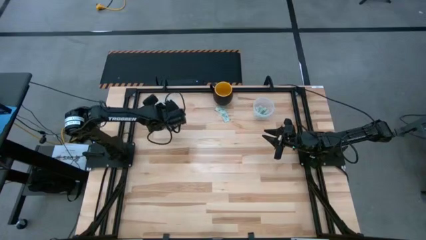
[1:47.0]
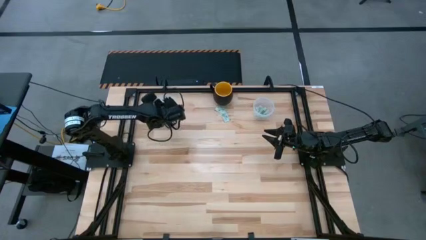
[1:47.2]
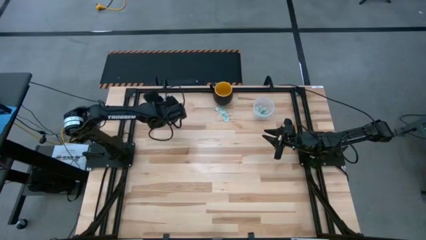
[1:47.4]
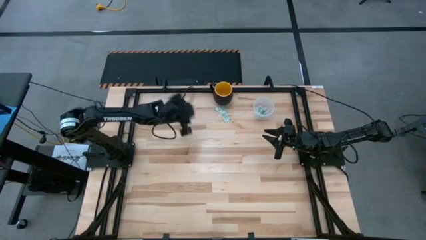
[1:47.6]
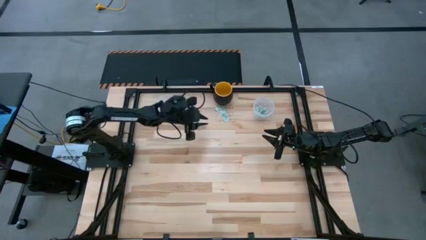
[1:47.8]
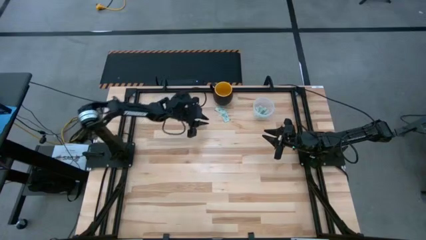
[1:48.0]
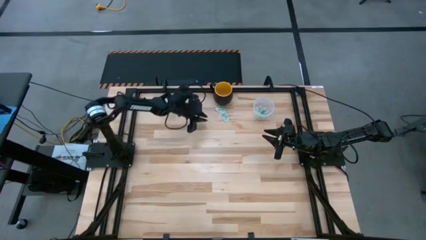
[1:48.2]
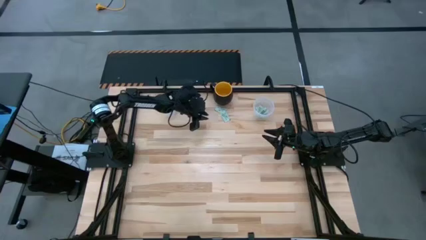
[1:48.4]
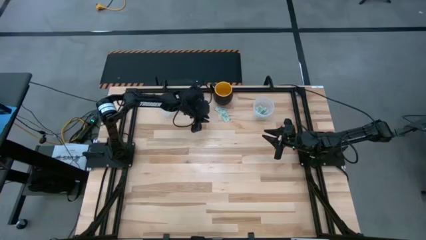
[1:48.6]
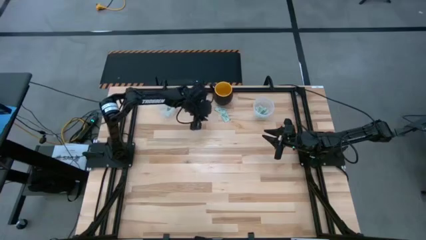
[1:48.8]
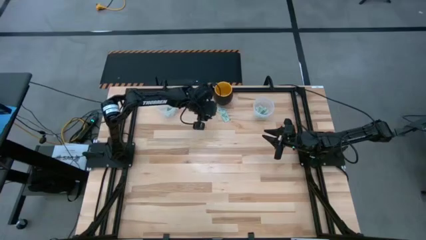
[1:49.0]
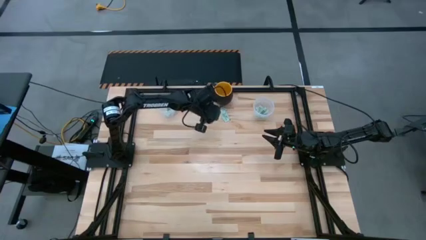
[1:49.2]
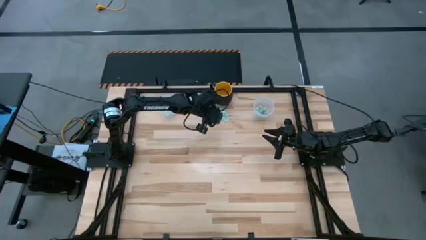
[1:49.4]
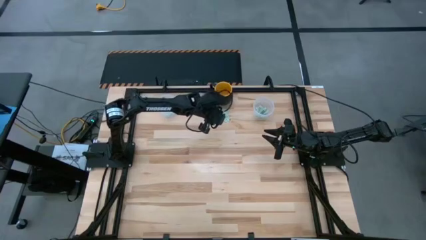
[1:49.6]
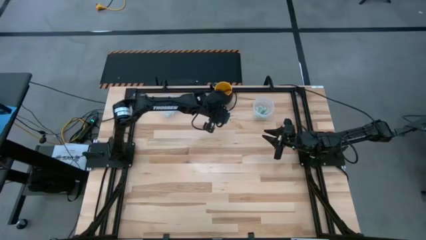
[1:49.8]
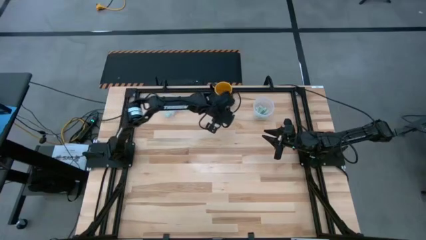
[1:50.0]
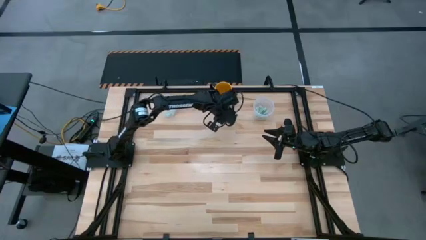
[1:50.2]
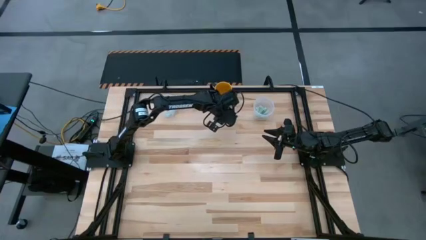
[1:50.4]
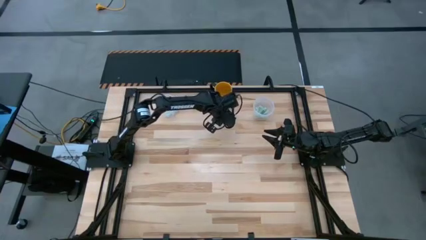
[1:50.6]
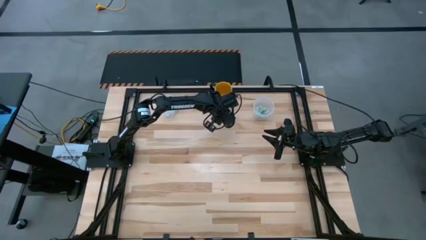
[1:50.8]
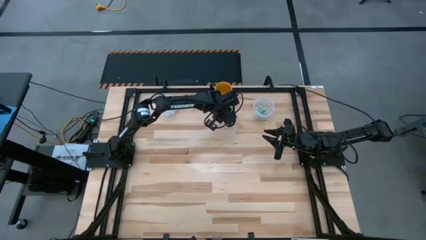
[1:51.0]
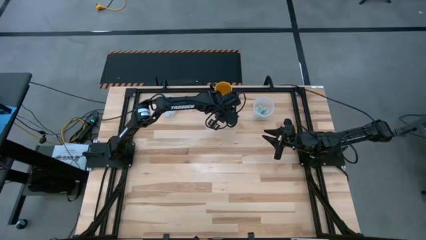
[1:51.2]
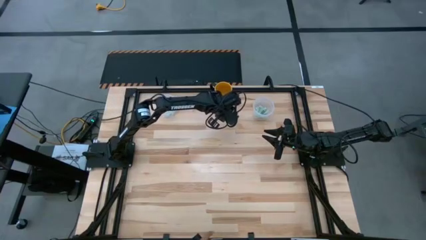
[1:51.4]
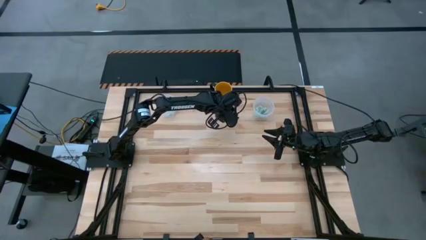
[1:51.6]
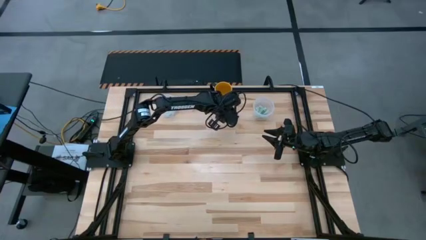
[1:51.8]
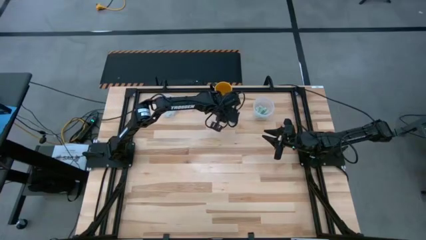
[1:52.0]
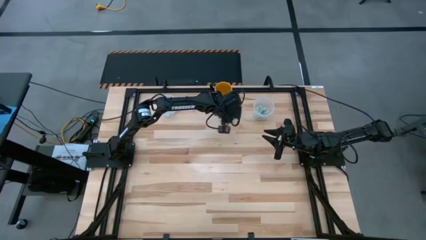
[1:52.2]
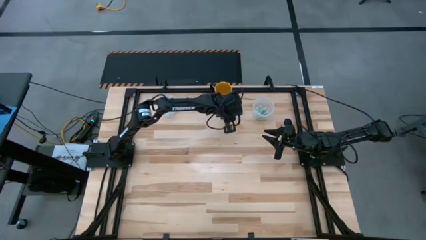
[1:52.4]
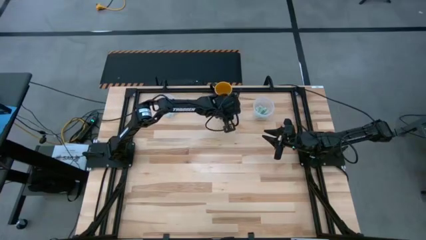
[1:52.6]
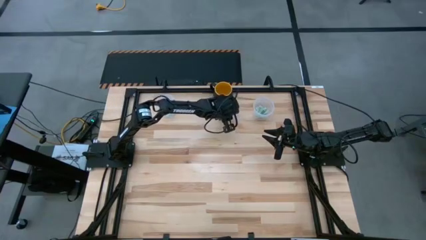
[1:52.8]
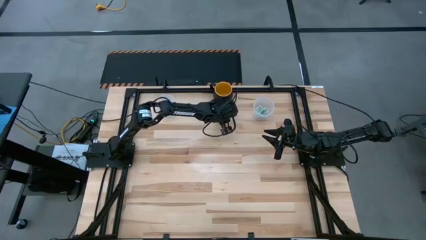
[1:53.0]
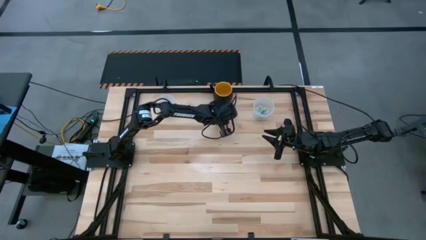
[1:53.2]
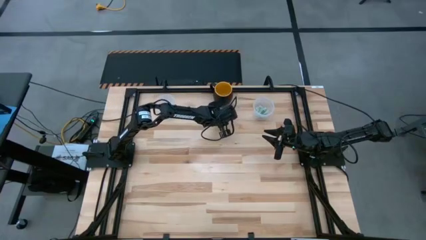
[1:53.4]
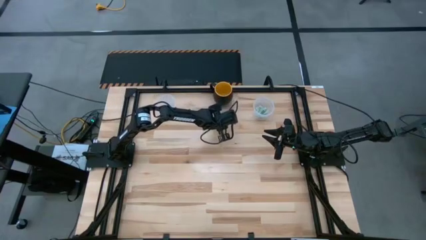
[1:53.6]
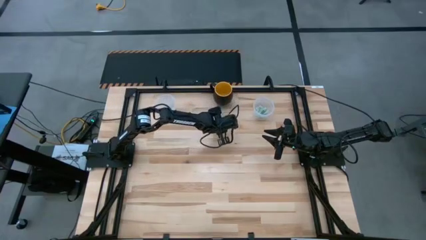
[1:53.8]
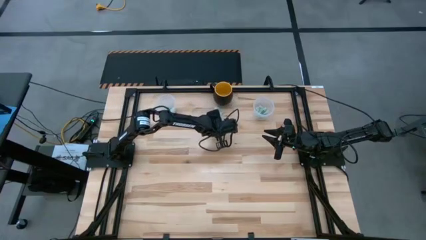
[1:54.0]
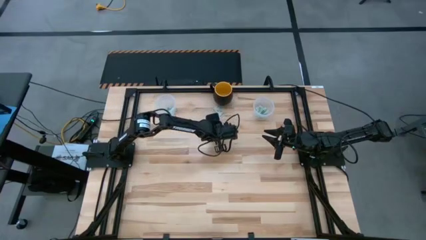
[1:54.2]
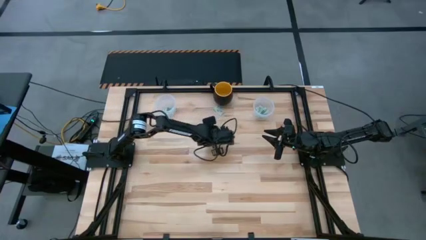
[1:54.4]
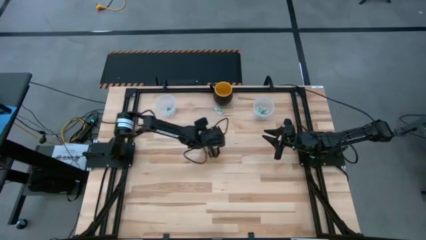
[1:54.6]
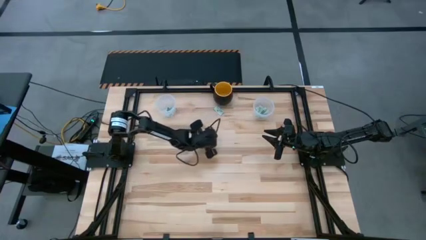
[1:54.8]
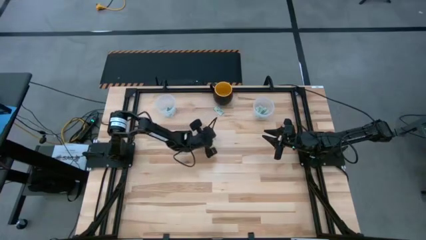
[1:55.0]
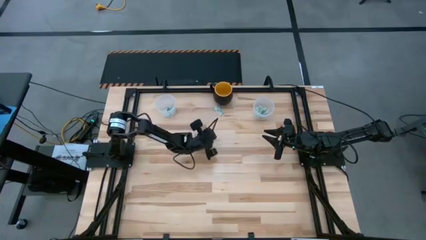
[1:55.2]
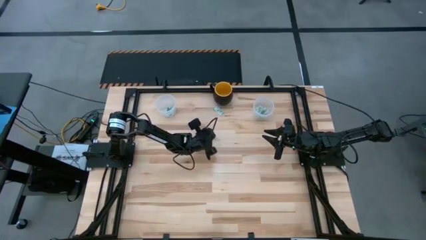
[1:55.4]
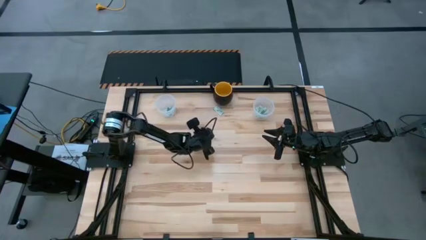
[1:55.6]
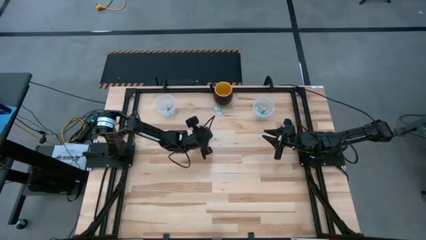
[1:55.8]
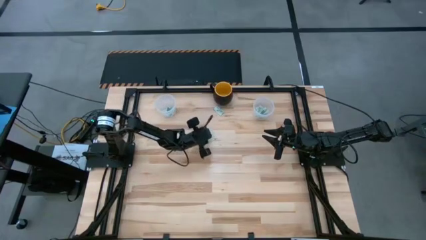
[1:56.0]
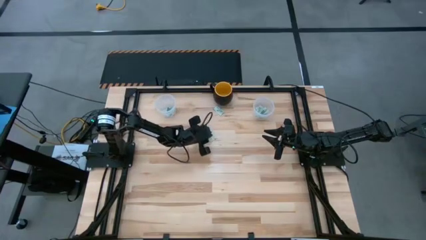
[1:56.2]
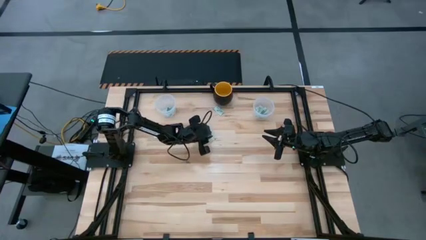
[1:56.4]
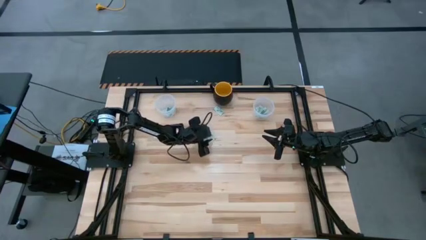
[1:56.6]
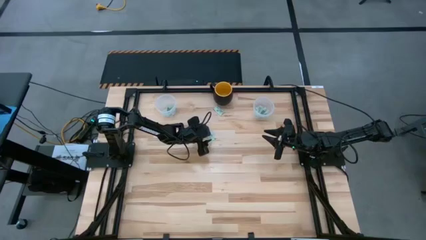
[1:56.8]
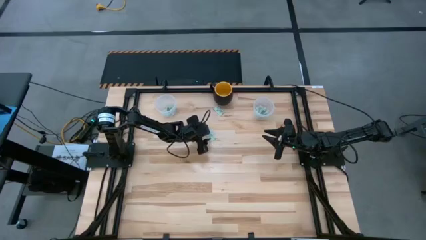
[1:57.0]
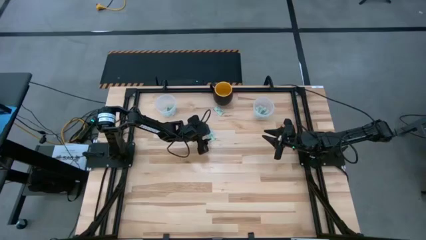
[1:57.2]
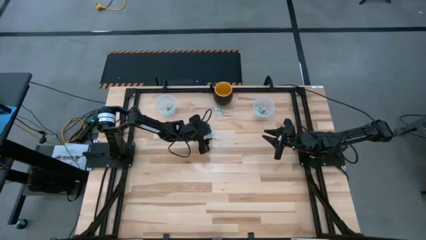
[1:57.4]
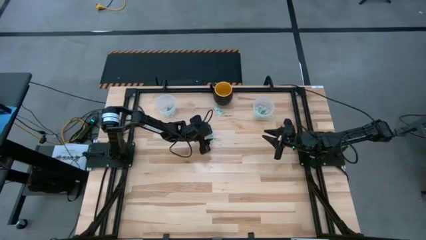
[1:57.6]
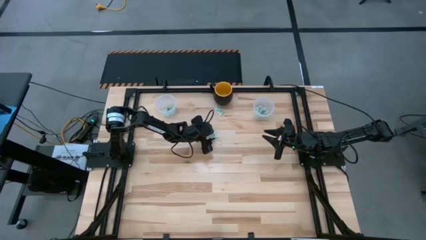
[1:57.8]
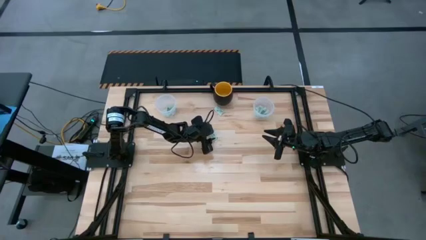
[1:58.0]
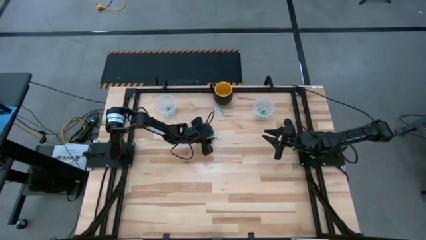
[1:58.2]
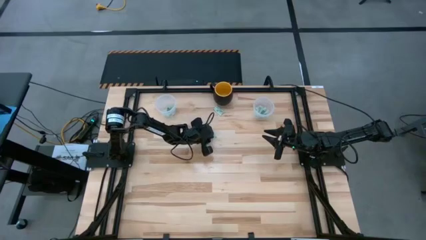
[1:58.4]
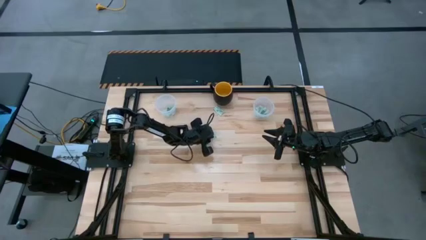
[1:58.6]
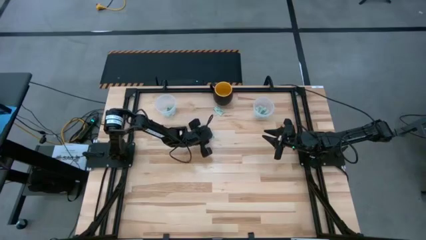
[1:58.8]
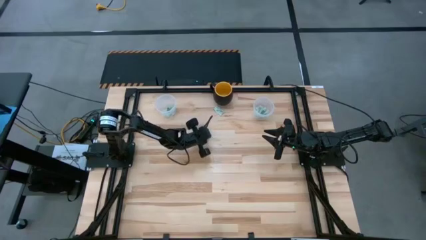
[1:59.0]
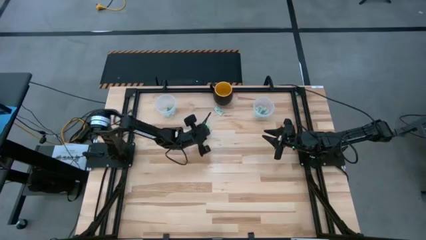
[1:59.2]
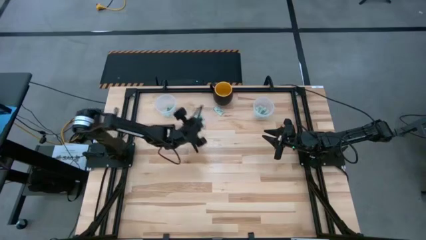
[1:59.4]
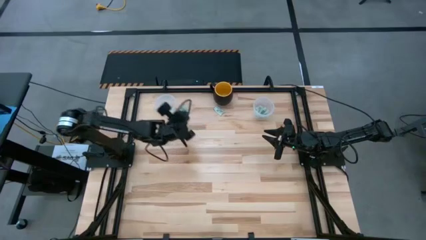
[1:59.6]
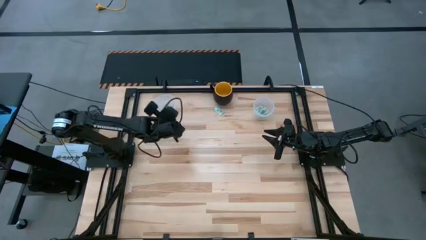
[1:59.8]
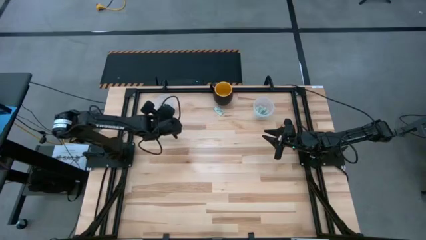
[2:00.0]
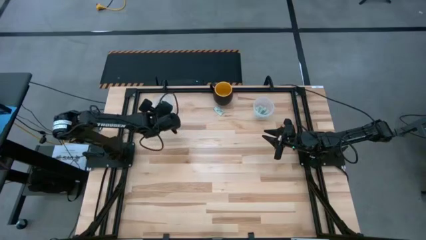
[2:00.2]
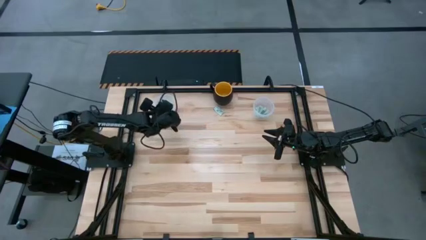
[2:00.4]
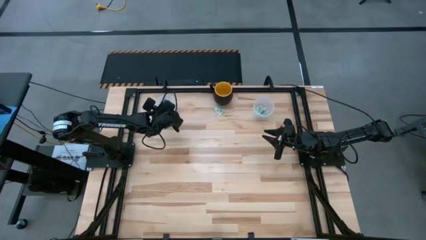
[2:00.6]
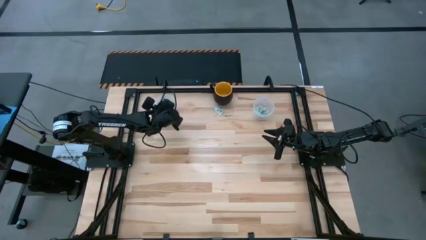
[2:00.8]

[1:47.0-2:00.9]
Task: Pick and place Stevia / Truvia into bins
Put the stevia packet into the left transparent container
